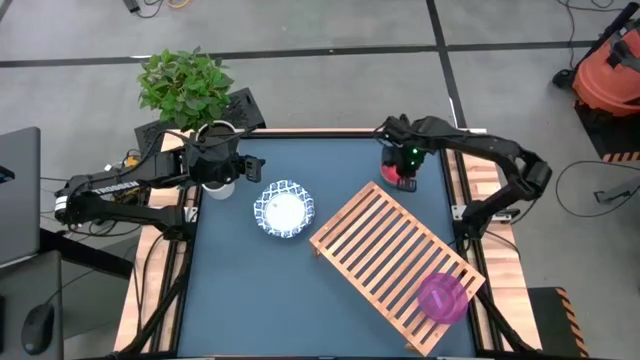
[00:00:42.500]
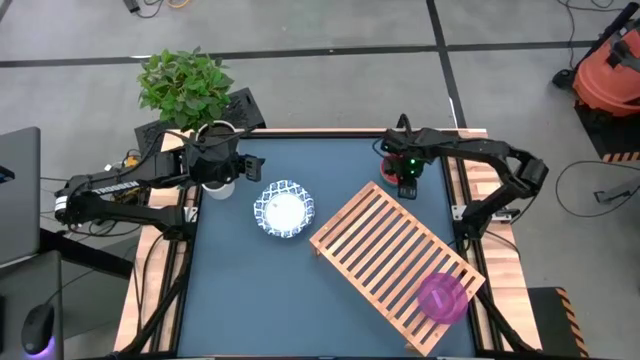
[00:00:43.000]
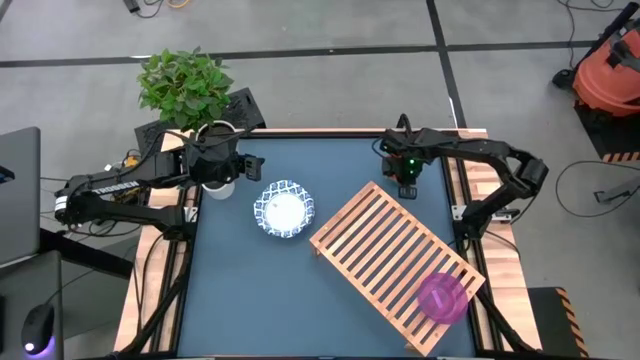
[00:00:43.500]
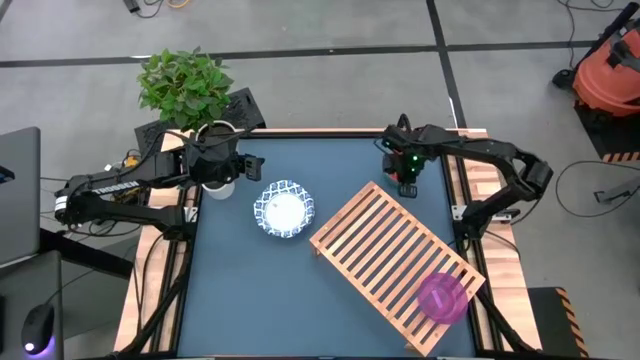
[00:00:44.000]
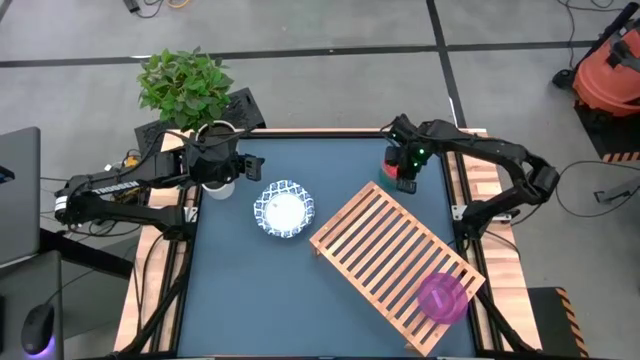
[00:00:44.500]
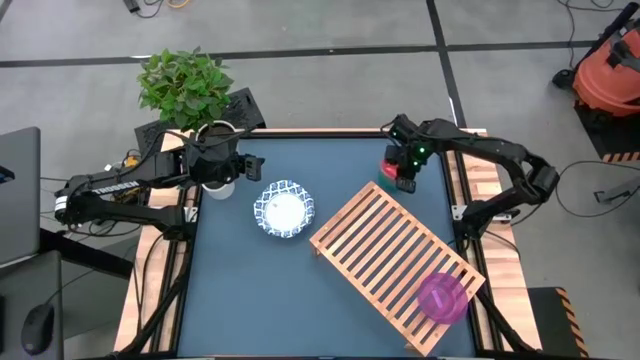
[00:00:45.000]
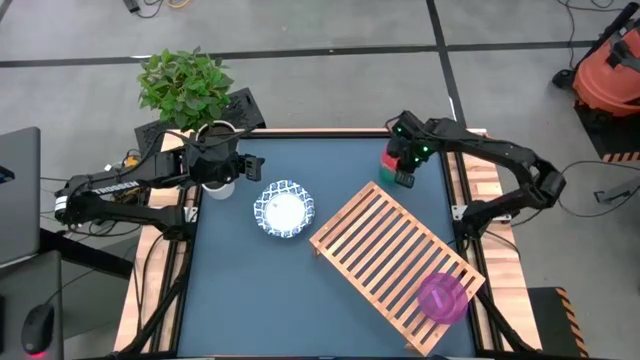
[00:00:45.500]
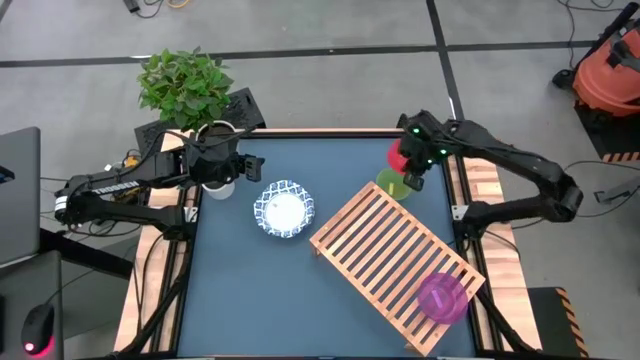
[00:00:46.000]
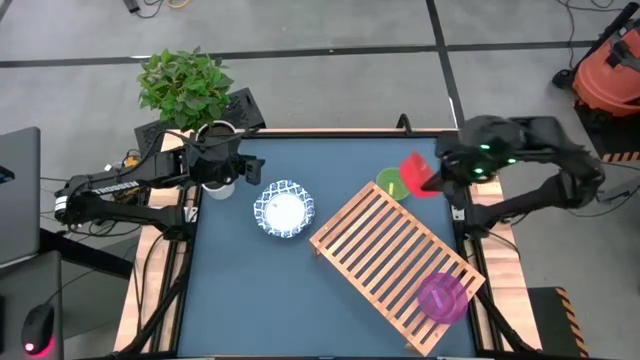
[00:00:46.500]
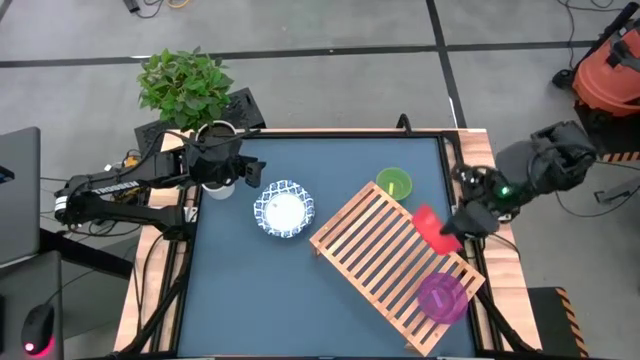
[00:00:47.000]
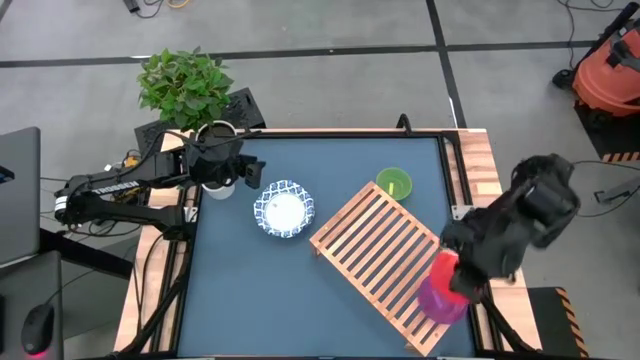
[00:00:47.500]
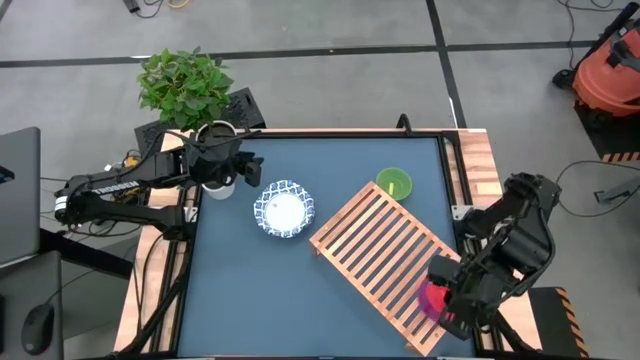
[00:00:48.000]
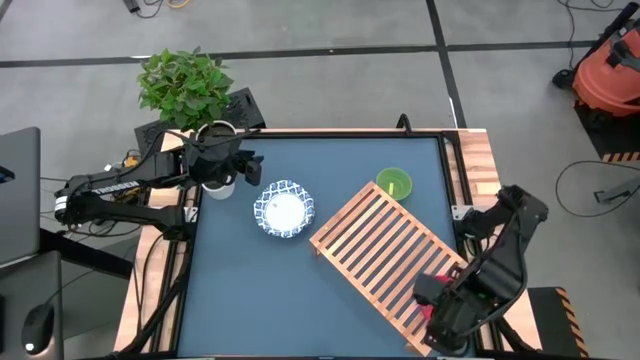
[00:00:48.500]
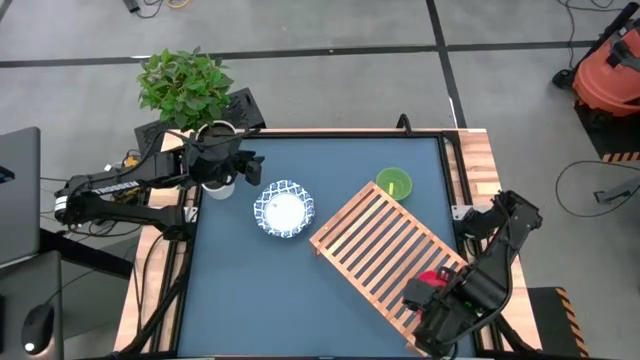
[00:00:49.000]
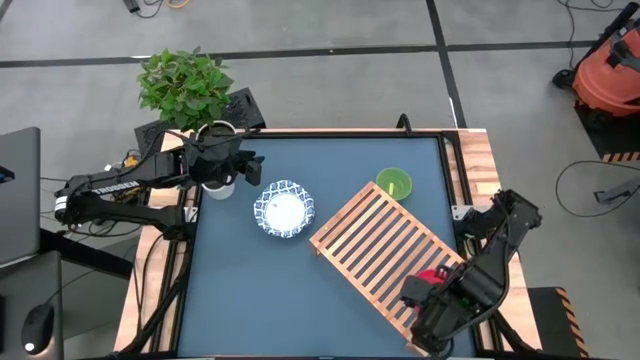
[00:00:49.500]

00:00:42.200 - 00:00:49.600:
Task: Place and stack bowls onto a shelf
Stack the small red bowl on top of the small purple bowl on the shelf

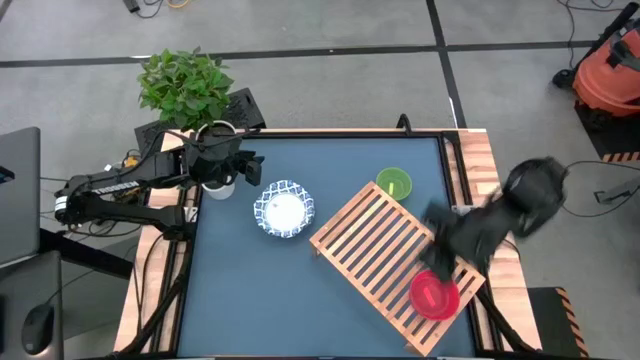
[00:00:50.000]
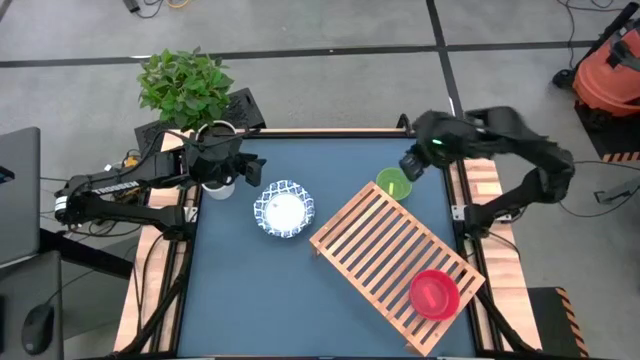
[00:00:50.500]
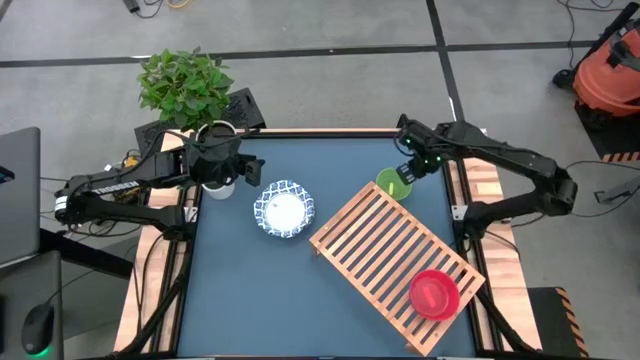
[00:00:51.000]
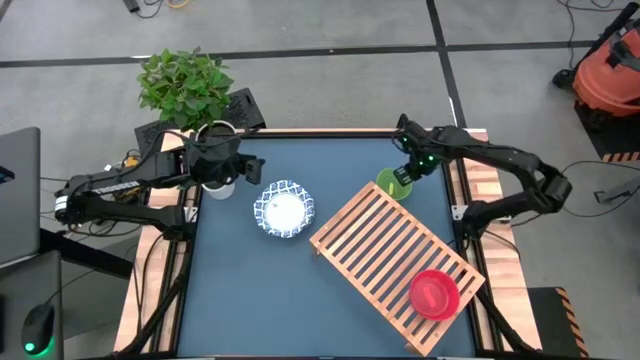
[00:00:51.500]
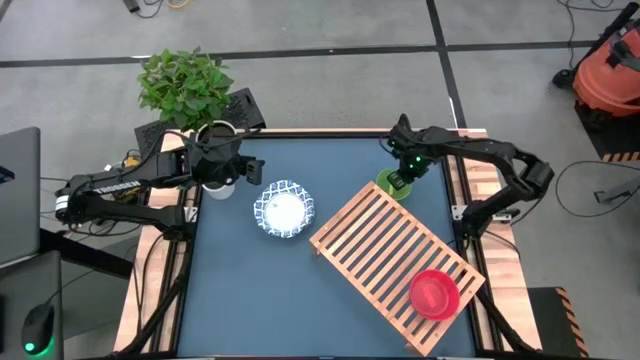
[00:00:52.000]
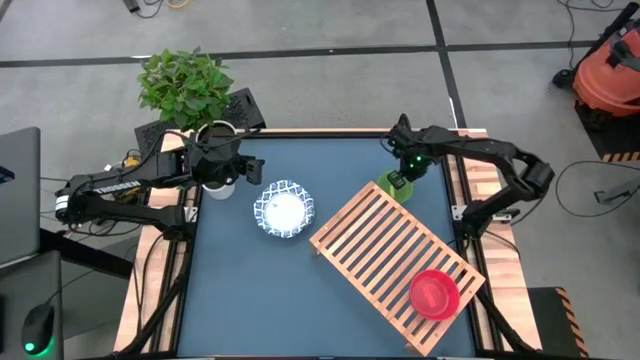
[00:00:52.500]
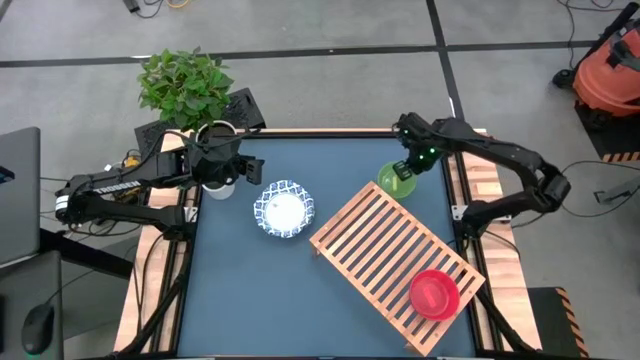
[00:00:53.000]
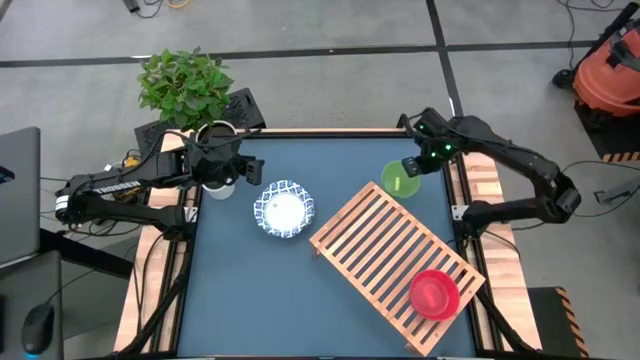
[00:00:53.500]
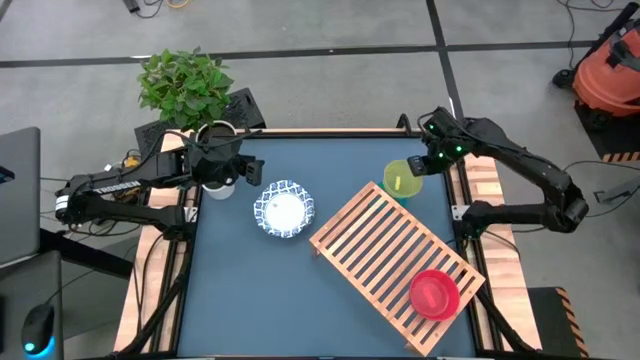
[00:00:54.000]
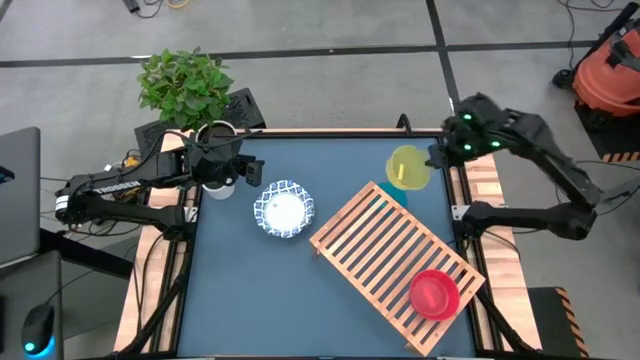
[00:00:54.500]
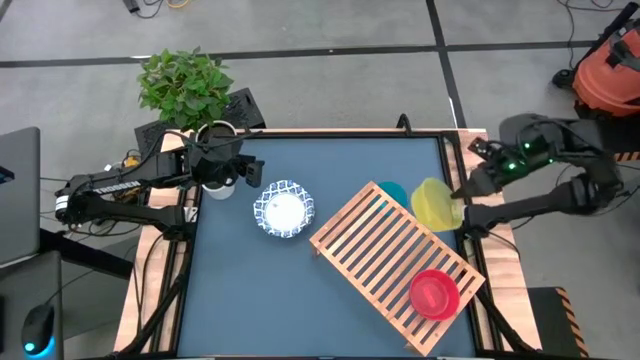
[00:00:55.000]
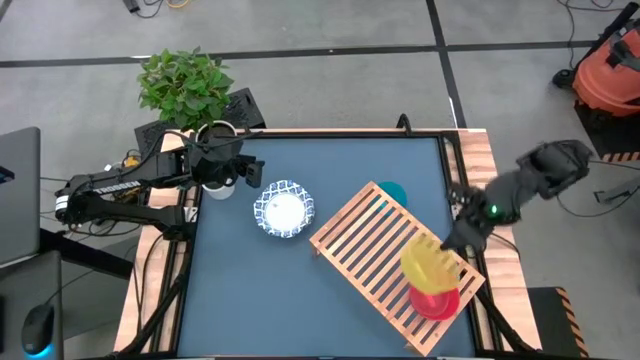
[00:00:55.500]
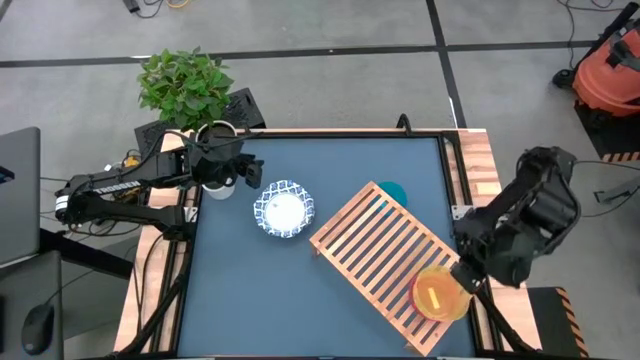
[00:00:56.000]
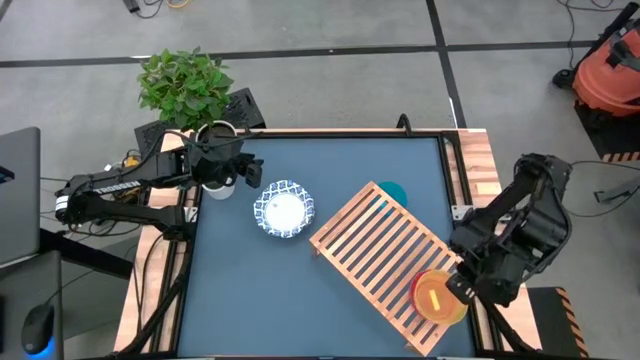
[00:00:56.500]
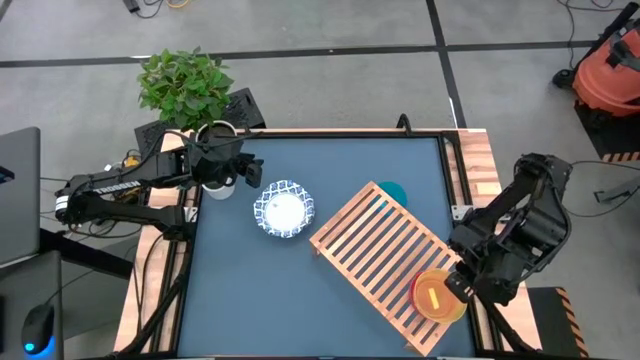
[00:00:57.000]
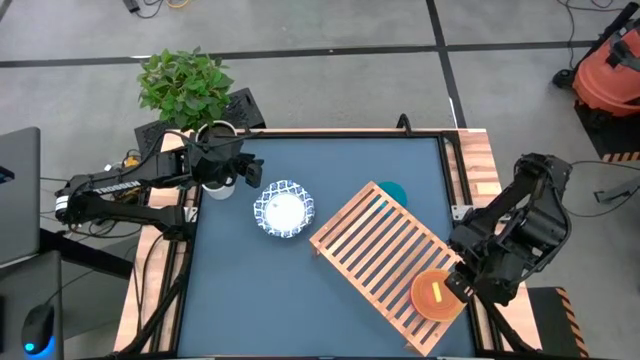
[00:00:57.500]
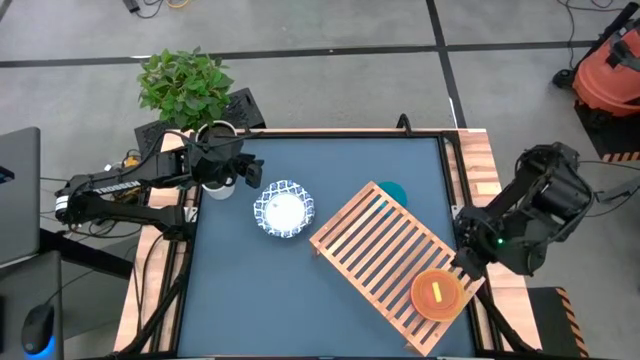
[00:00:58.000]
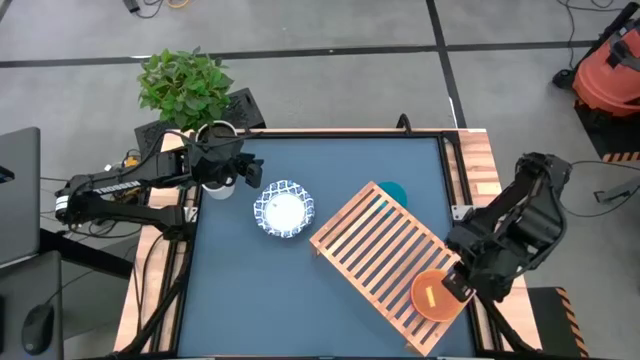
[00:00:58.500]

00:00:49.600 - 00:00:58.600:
Stack the small yellow bowl on top of the small red bowl on the shelf

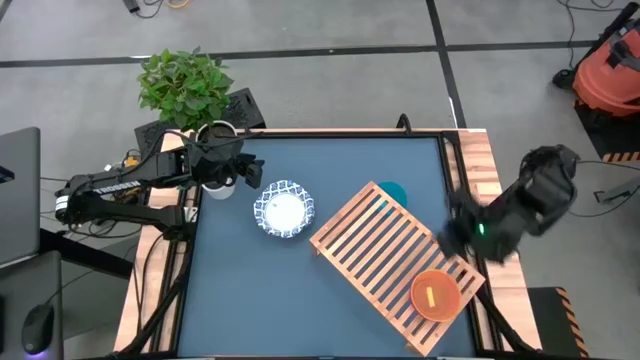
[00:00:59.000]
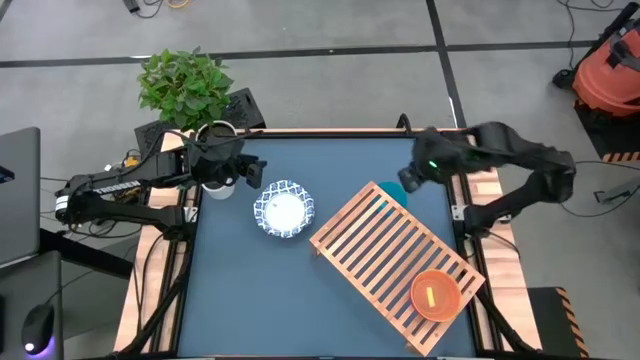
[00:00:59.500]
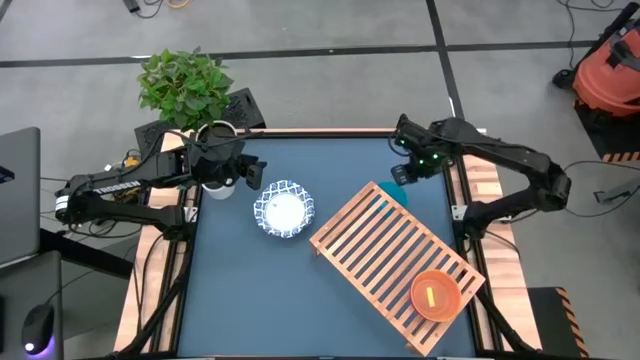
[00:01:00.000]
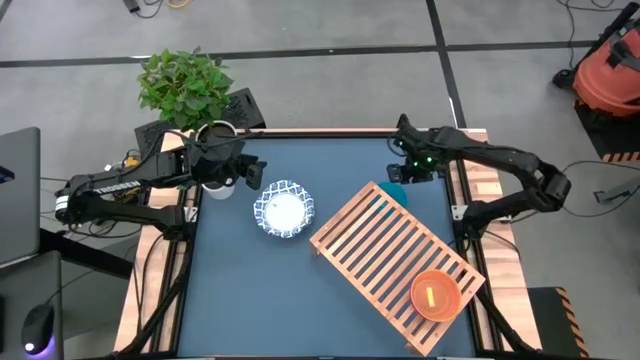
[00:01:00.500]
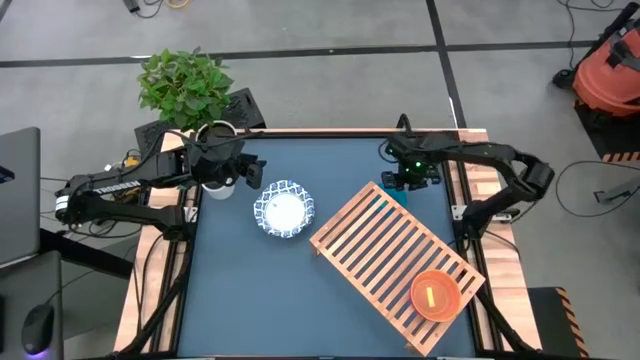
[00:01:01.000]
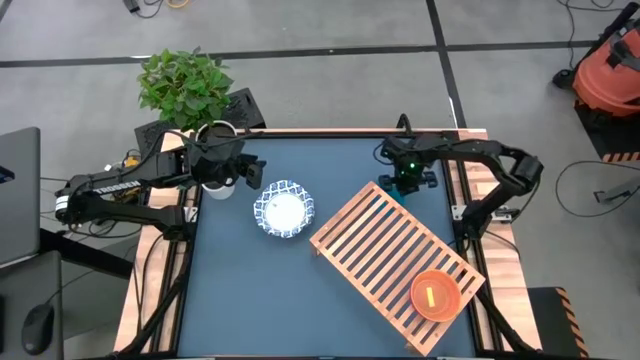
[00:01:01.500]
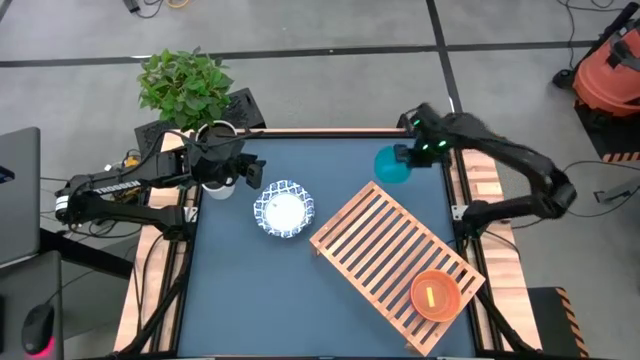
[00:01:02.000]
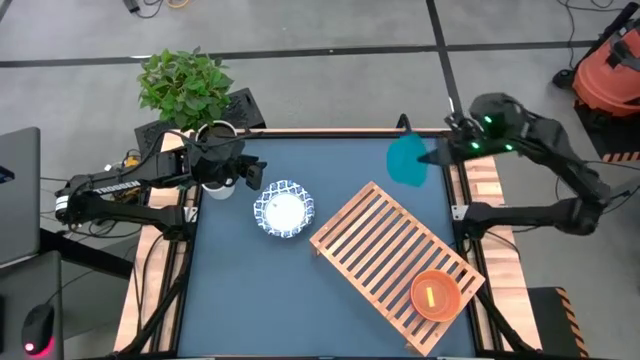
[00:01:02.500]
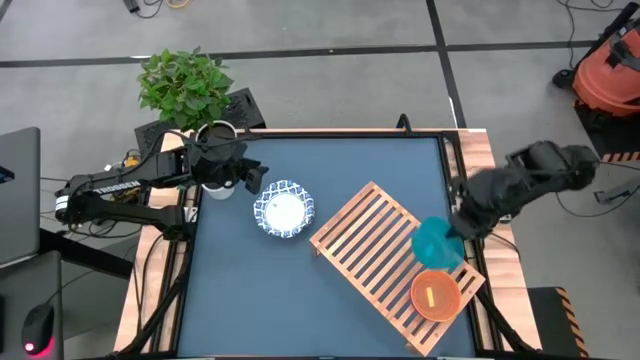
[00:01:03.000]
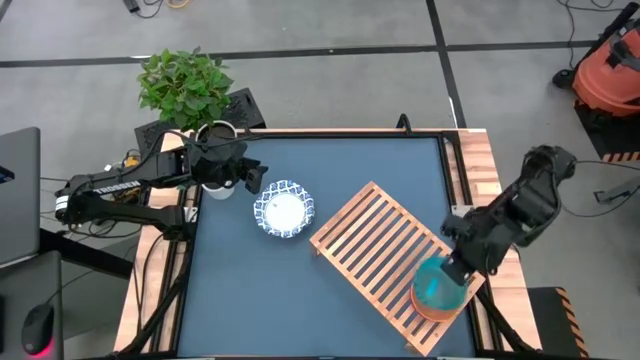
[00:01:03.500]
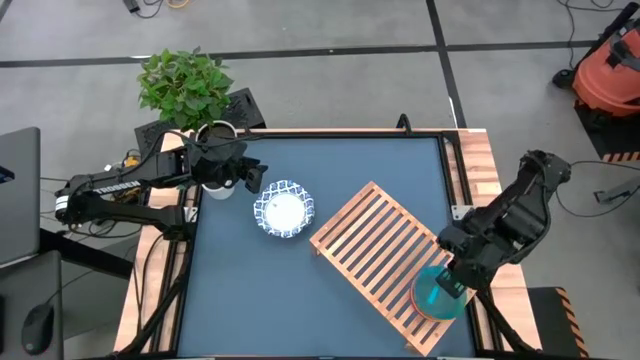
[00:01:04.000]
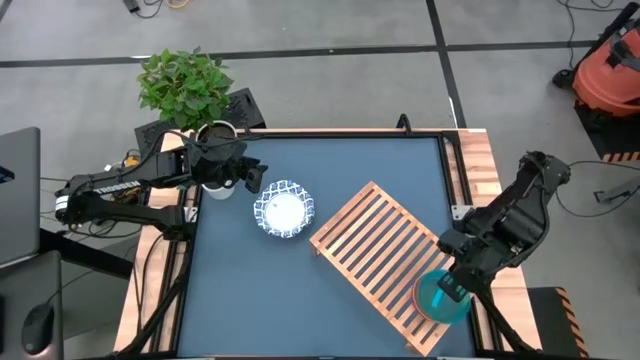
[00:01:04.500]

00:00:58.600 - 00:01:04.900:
Stack the small blue bowl on top of the small yellow bowl on the shelf

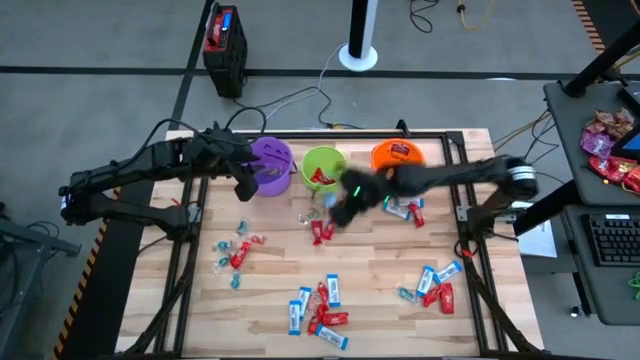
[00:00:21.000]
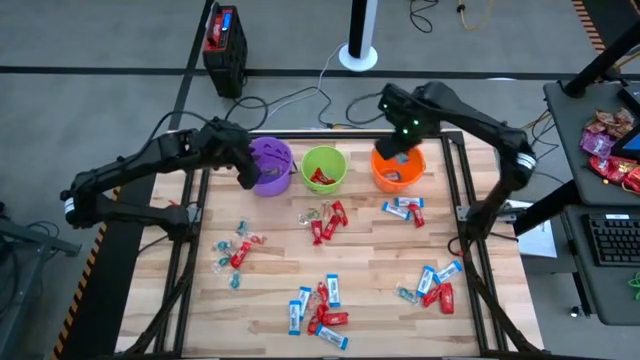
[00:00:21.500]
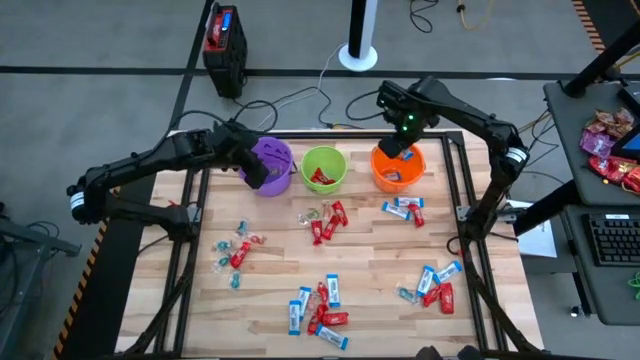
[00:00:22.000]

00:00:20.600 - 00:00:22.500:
Task: Sort candy by brand, put in halloween buckets
Put the white chocolate bar into the orange bucket
